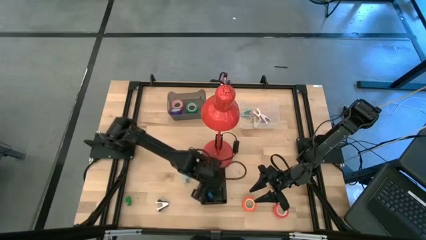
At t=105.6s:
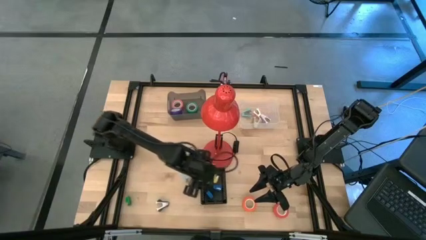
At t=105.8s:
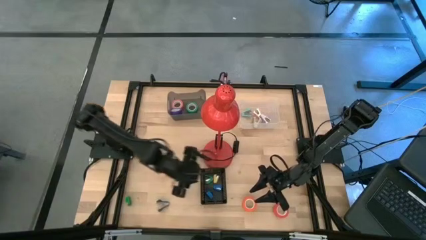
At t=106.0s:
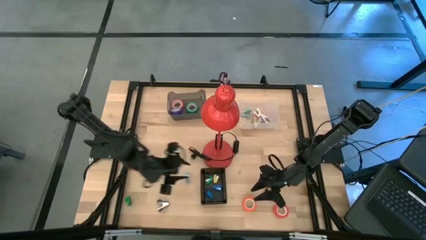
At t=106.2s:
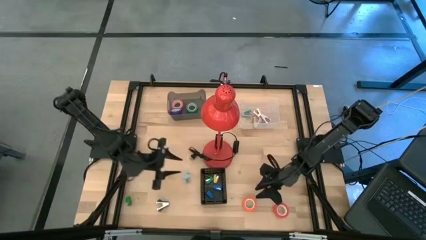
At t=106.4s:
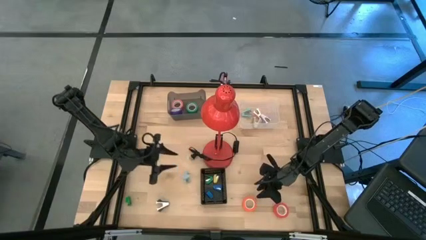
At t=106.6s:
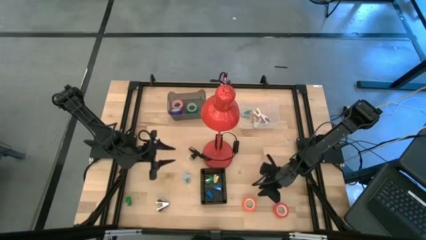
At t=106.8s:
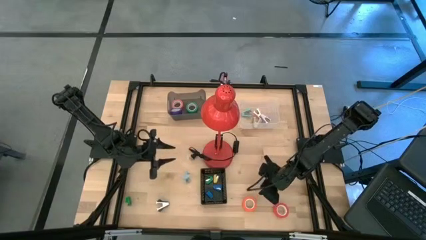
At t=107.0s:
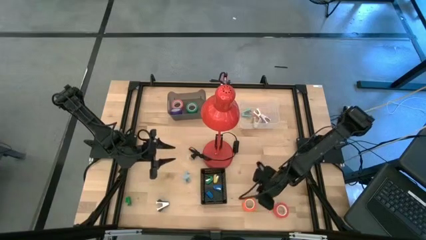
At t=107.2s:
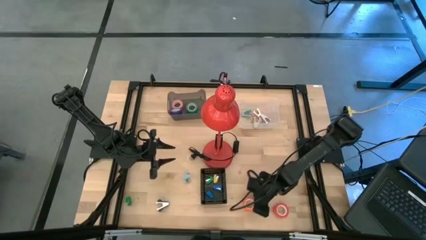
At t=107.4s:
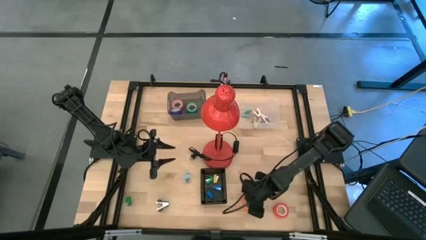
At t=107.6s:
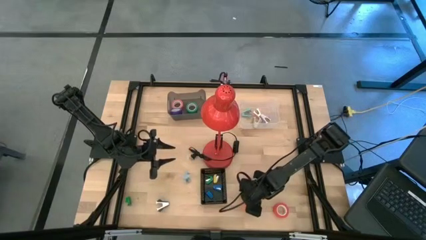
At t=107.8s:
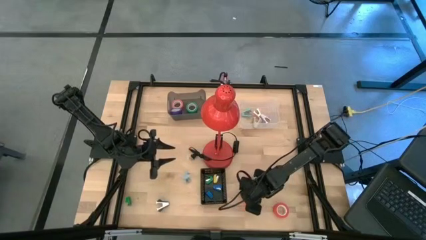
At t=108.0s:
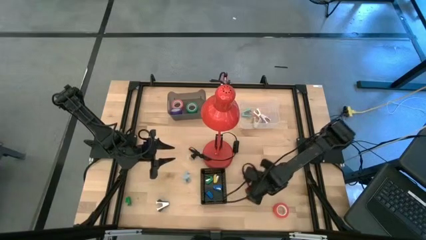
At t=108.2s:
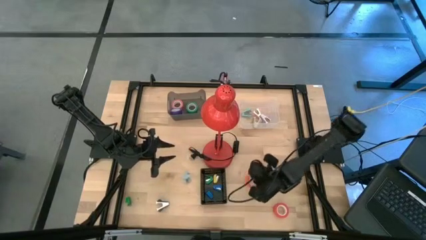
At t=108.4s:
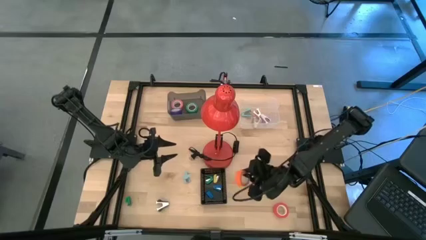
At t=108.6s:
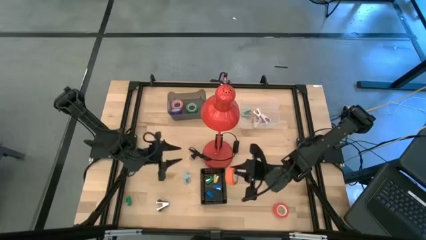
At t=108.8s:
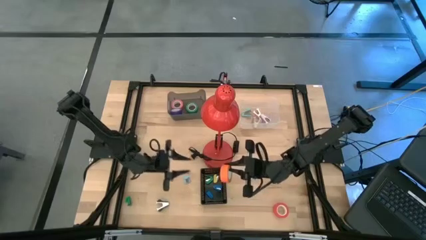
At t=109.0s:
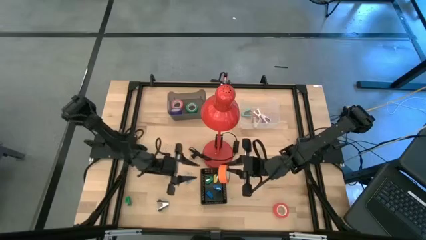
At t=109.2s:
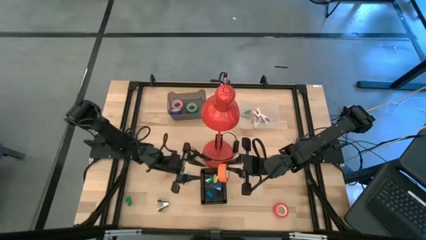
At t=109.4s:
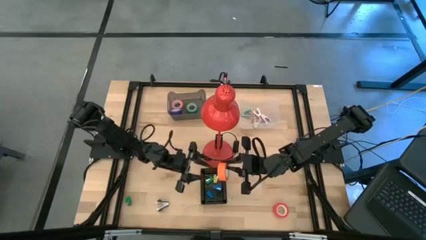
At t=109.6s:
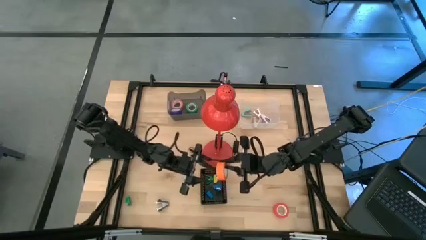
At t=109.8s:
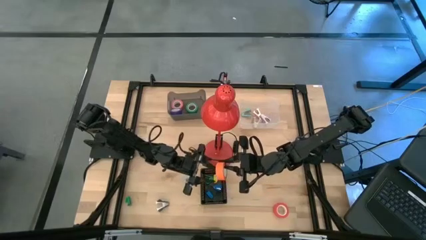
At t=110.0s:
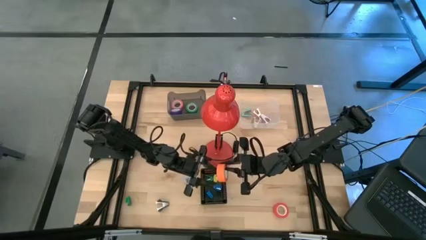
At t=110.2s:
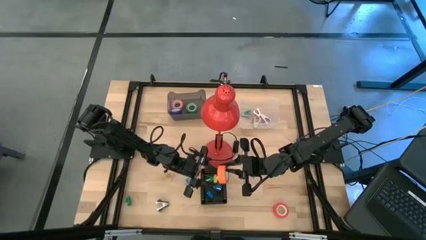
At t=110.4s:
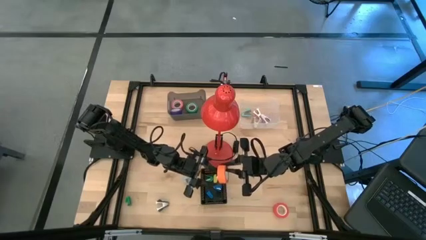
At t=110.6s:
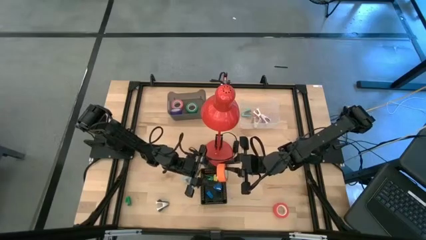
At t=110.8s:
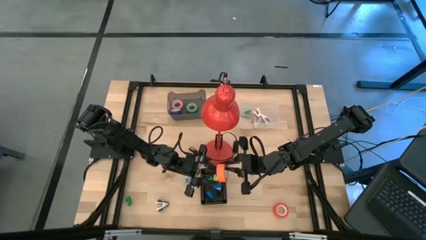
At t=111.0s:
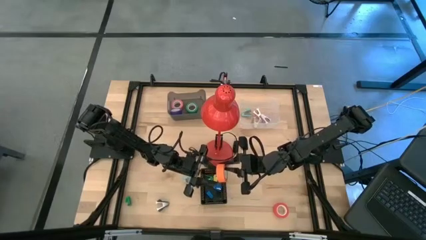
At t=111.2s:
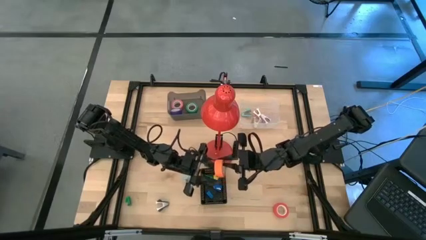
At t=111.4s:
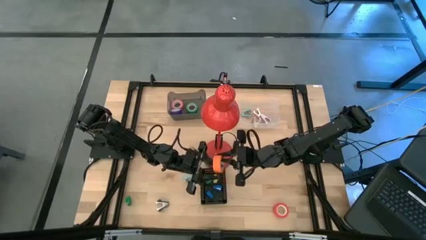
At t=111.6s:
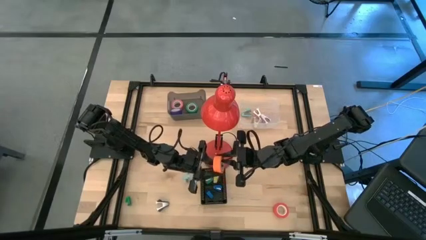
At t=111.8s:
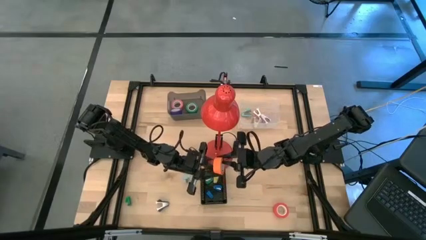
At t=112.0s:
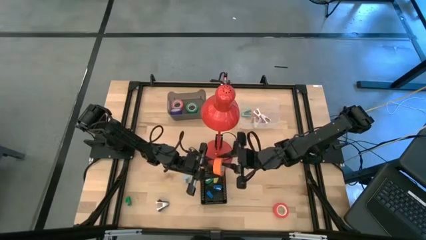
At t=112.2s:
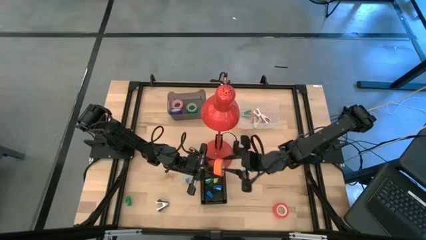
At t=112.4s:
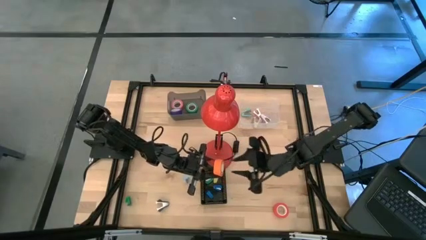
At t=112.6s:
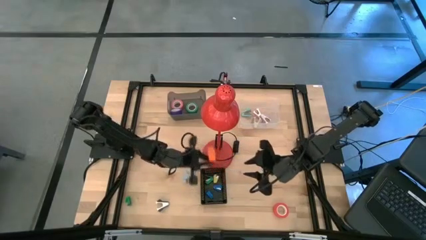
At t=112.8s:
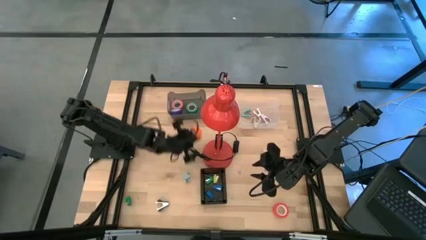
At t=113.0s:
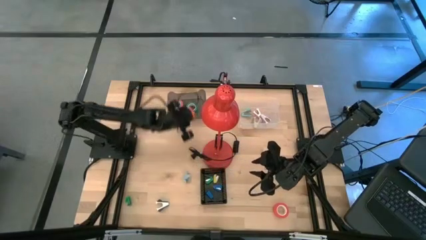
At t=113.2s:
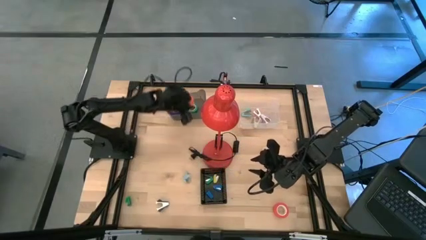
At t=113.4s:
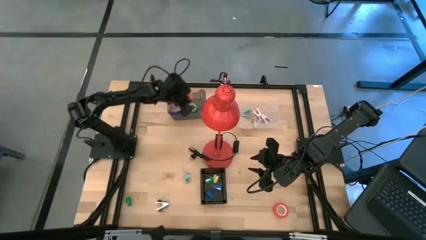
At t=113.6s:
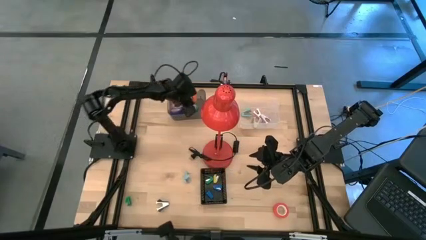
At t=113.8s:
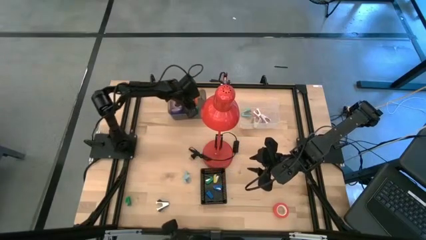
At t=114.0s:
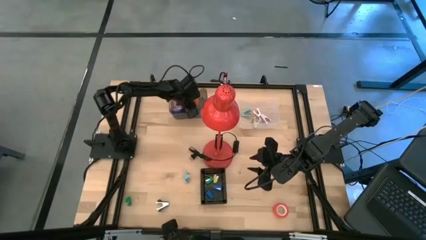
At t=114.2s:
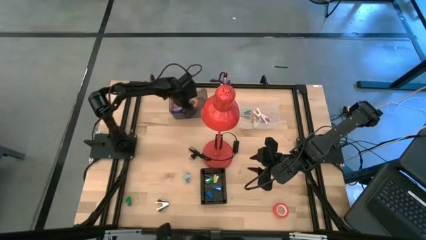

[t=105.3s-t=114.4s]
Task: Pick and place Stapler, Stapler remover, tape
Put the left orange tape into the black transparent bin

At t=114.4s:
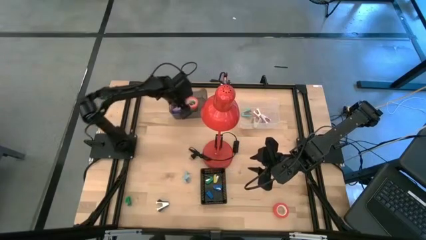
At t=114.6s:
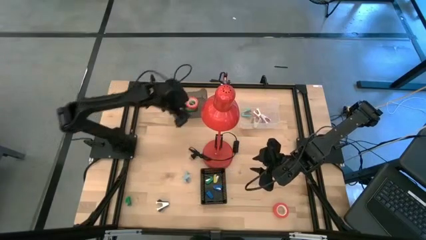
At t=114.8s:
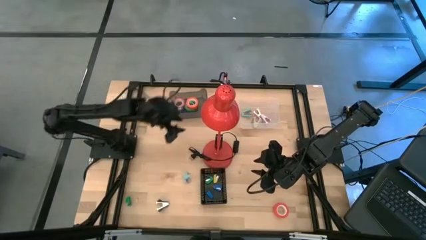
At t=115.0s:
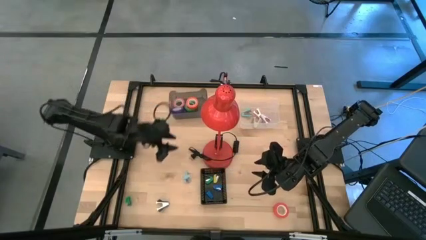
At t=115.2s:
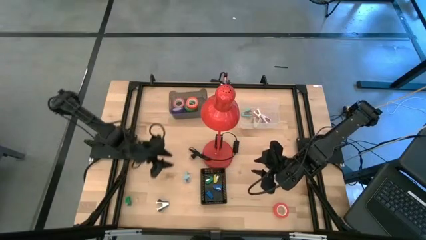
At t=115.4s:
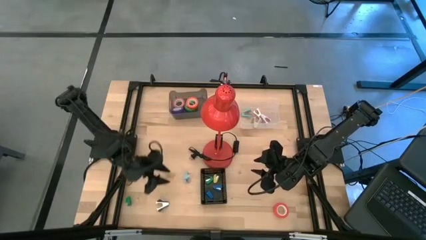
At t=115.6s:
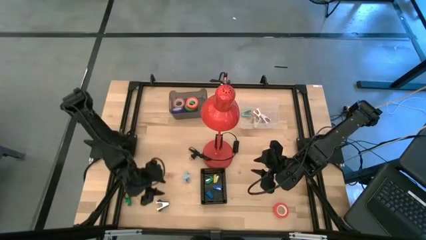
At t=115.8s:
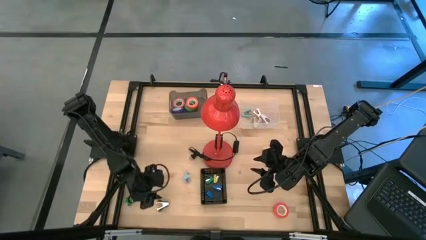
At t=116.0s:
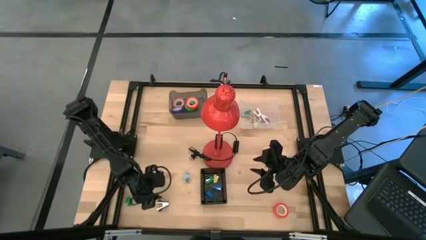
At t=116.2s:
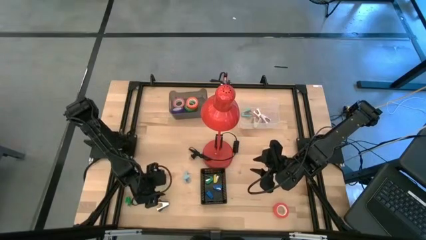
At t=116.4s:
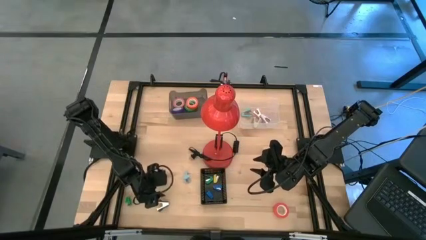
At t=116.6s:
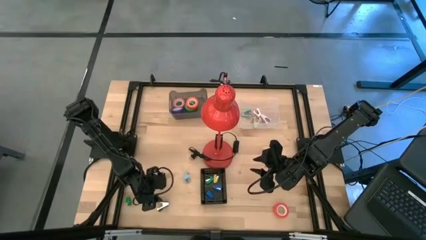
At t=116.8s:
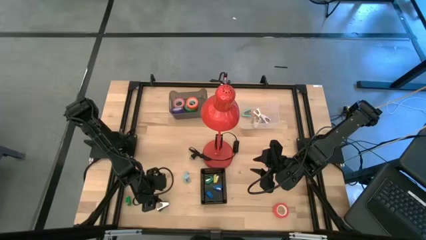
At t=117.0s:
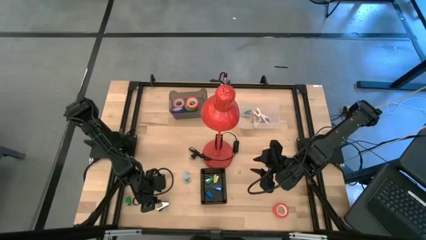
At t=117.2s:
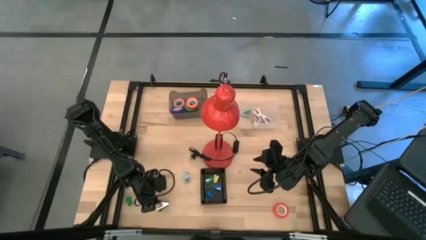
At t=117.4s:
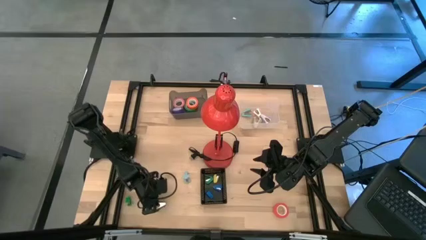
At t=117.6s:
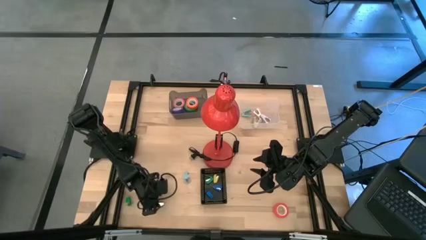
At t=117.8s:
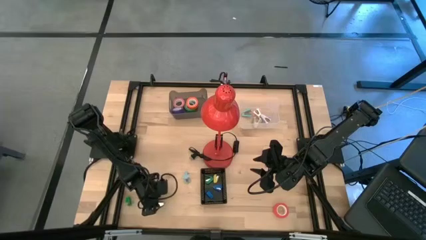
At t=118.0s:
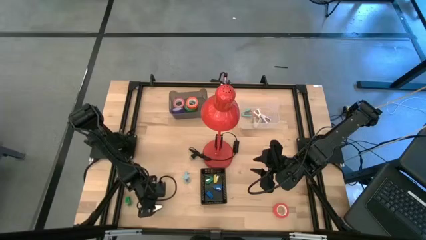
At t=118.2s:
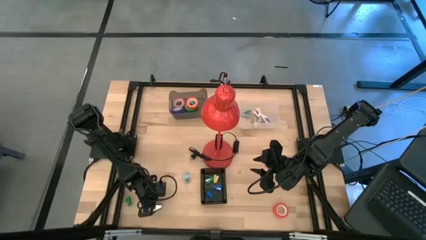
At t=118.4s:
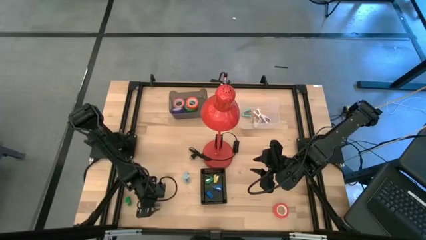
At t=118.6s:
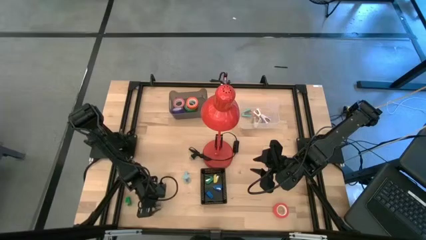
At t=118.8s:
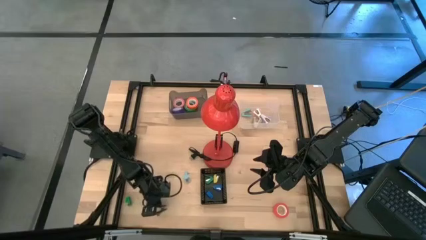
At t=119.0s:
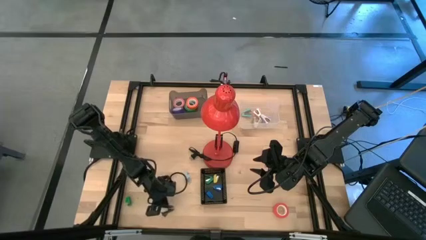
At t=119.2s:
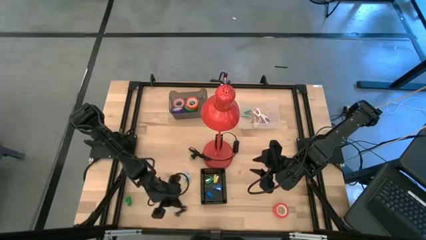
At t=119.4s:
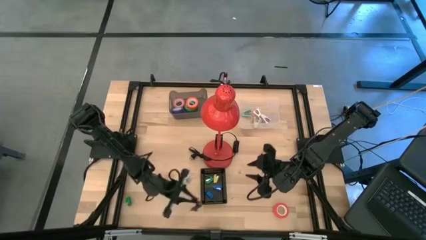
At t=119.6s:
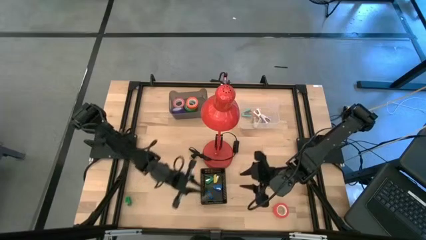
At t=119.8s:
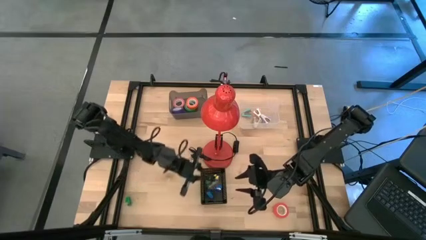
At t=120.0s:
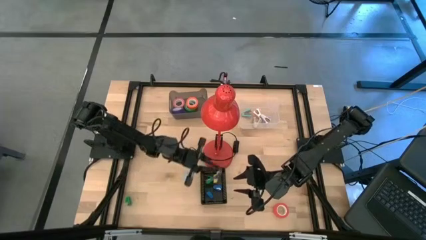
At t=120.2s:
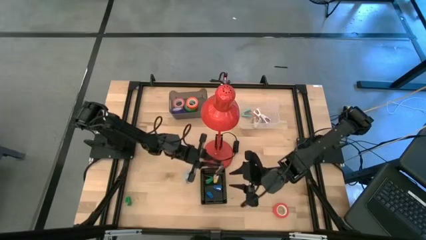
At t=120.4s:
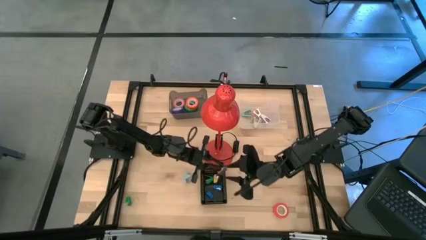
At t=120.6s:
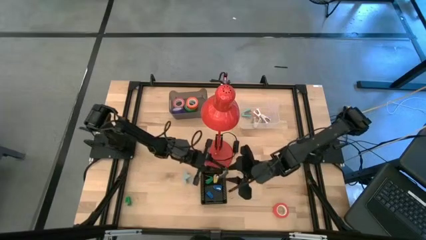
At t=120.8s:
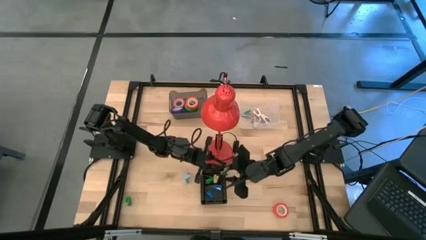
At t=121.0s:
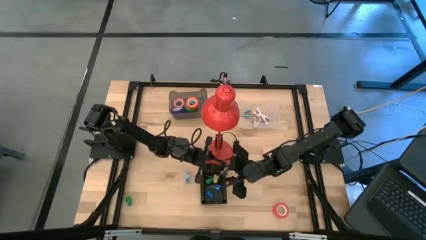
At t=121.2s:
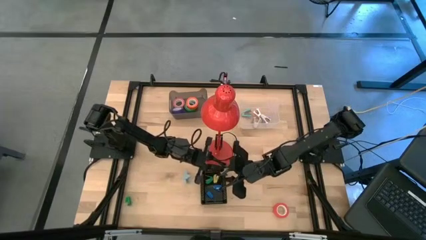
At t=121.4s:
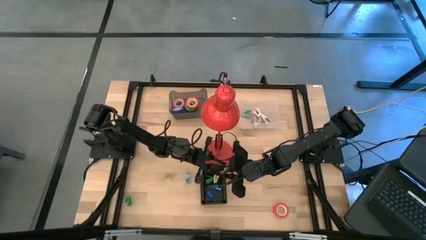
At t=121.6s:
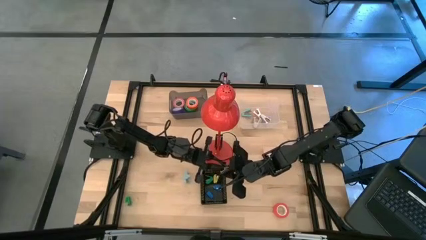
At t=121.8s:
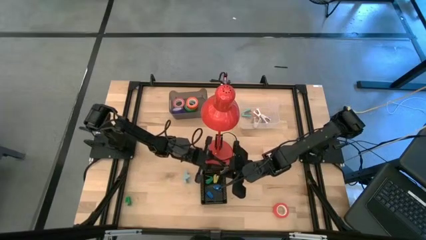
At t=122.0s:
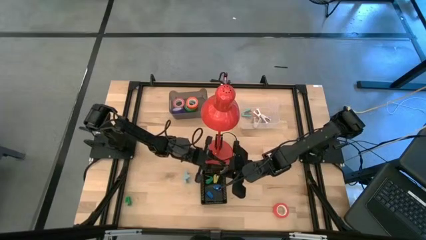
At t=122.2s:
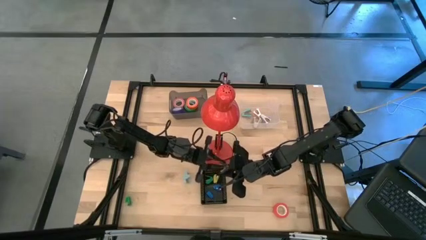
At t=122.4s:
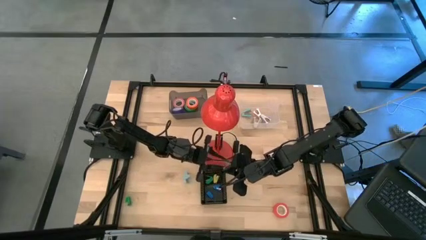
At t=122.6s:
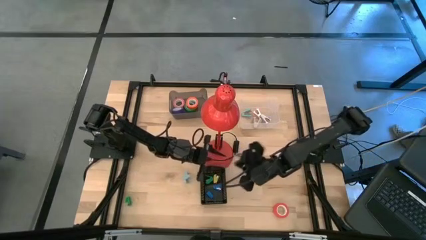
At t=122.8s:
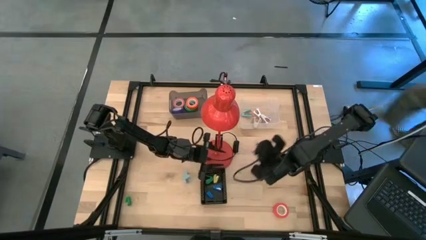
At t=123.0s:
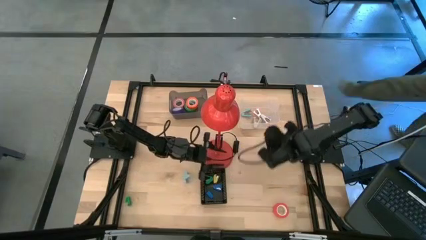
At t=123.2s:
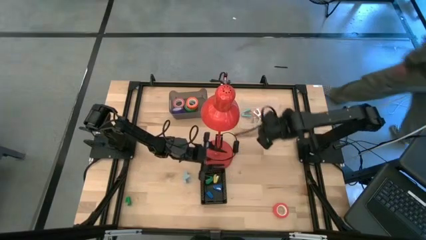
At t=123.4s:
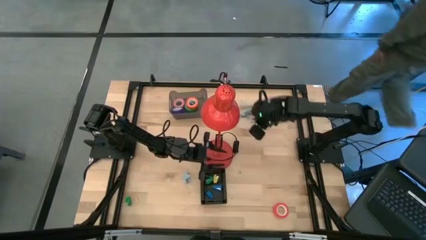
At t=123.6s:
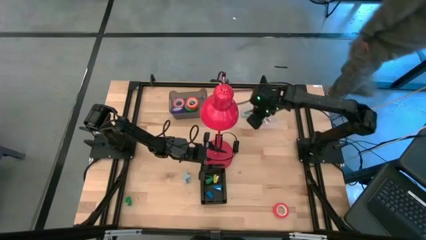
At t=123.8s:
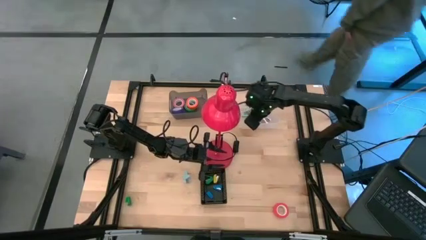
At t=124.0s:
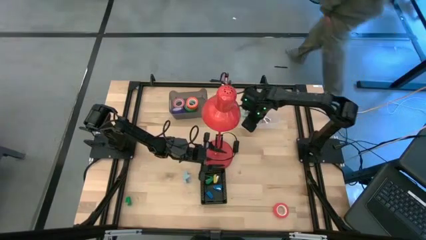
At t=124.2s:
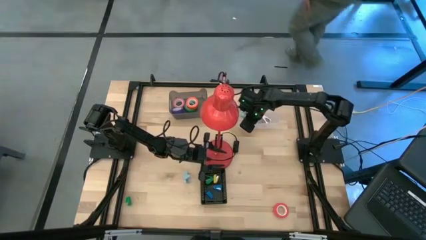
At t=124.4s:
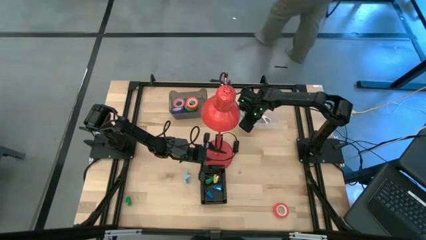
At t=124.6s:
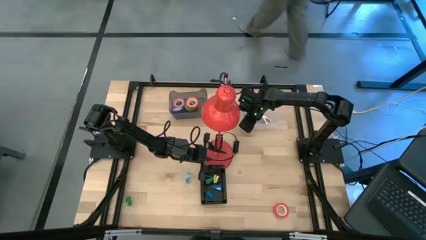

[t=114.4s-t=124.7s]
Put the black staple remover into the transparent bin
